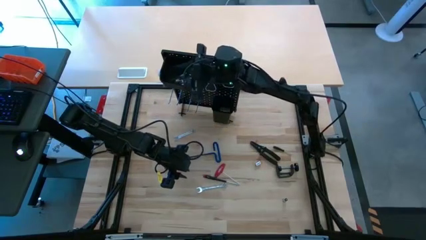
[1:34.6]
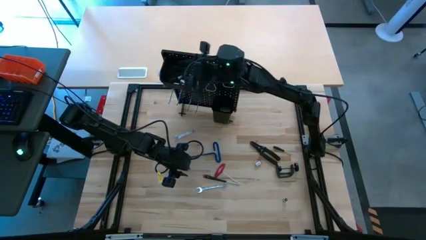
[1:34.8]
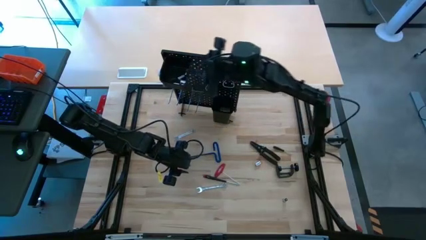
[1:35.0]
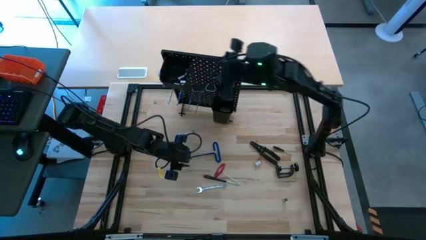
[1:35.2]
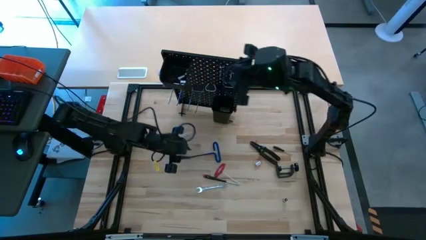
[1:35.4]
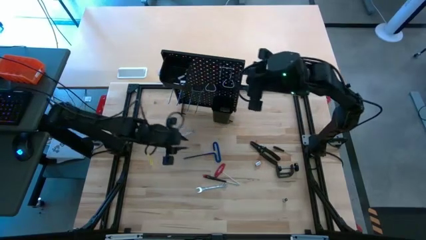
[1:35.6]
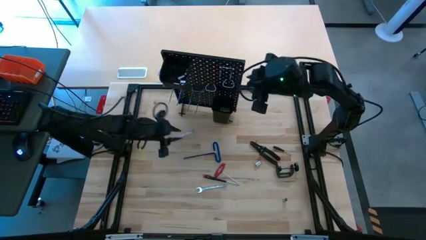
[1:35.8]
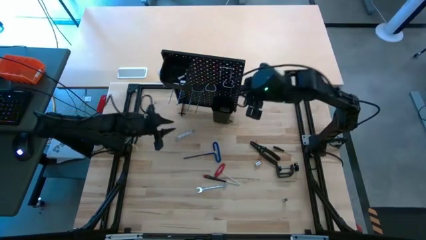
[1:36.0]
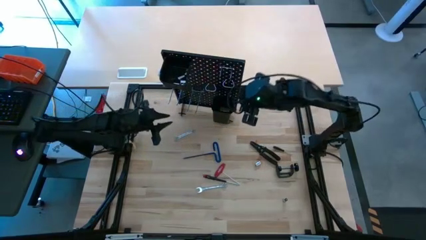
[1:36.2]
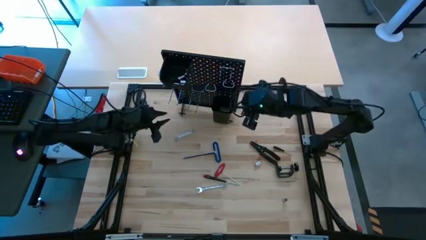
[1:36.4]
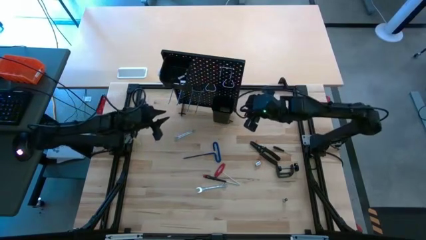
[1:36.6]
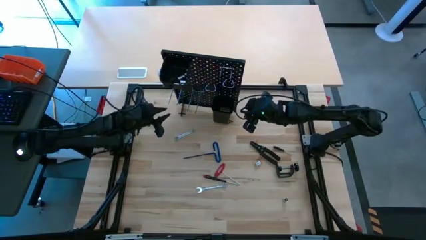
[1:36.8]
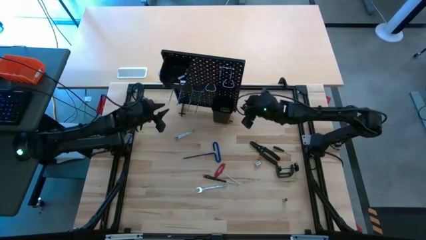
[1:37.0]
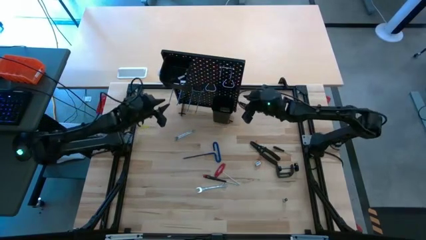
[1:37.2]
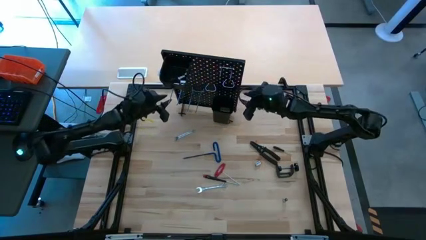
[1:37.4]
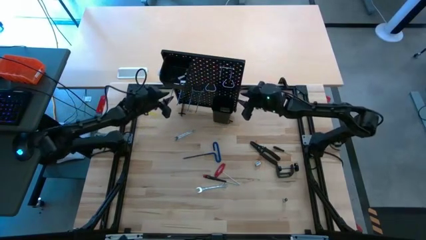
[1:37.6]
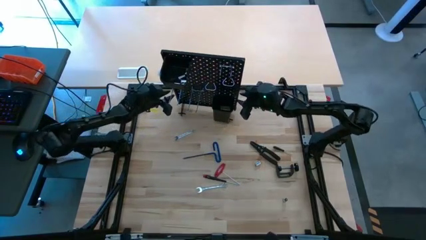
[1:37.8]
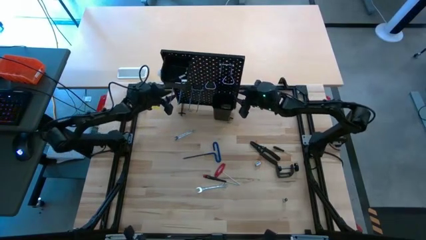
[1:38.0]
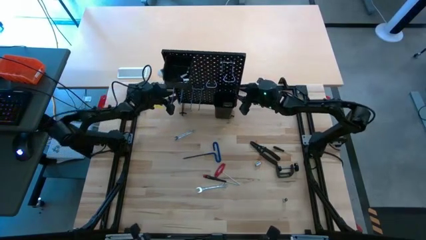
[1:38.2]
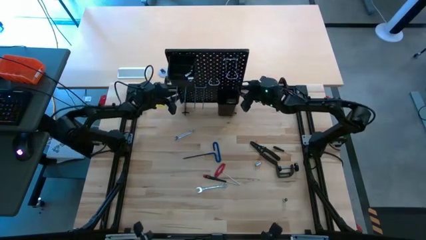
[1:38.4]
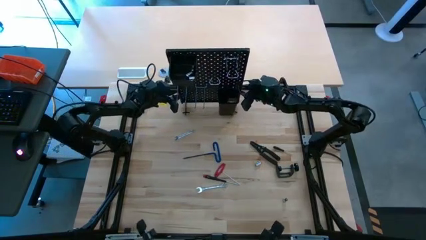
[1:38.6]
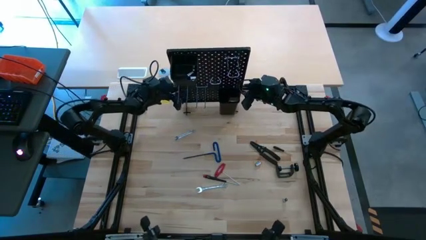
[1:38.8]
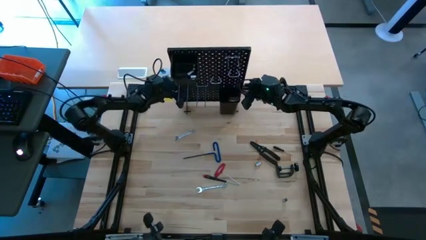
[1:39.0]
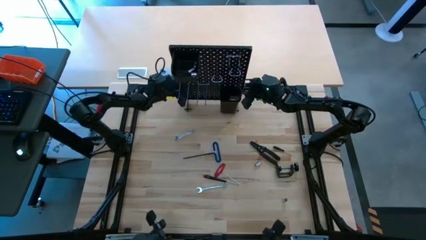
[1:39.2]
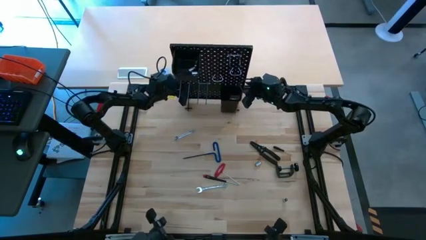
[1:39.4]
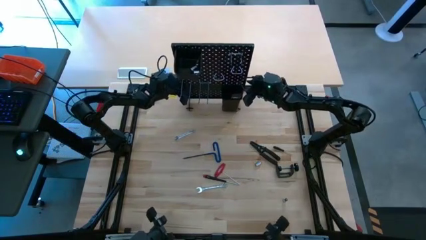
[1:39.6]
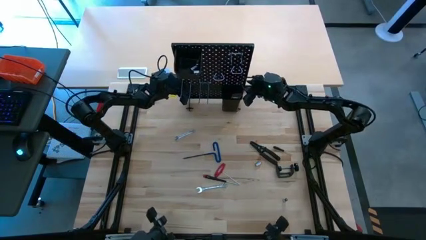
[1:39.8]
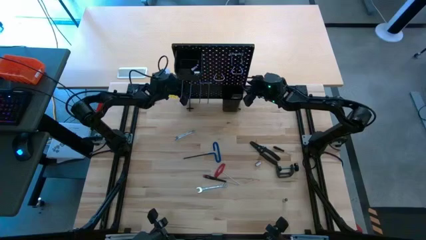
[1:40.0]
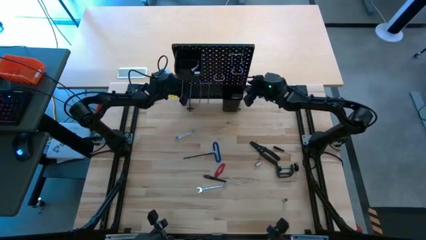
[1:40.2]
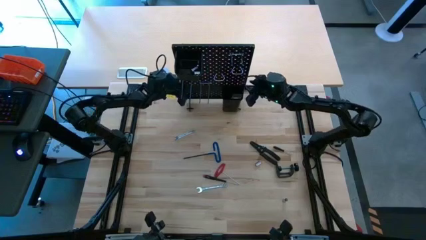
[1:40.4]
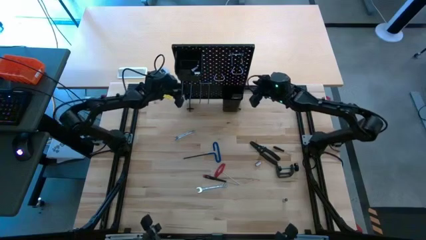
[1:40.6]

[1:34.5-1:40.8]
Task: Hang tools onto peg board
Adjust the pegboard

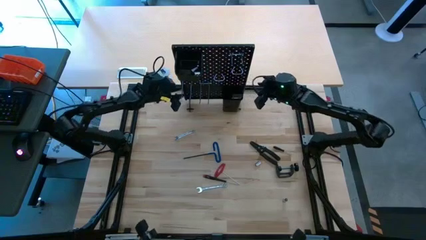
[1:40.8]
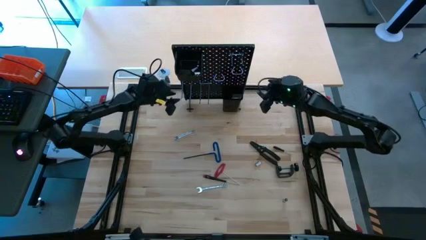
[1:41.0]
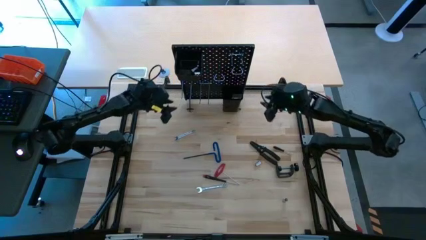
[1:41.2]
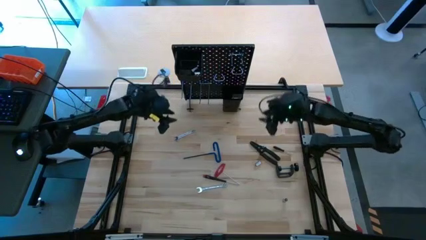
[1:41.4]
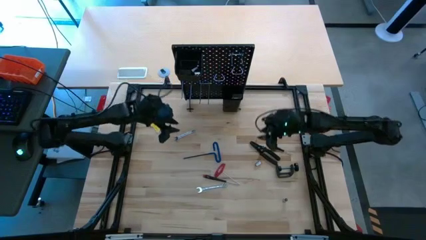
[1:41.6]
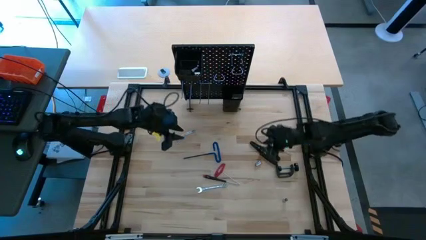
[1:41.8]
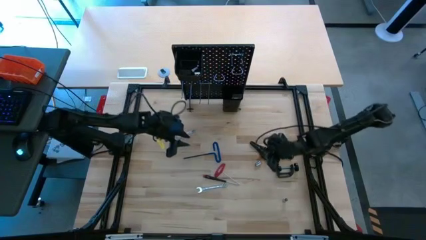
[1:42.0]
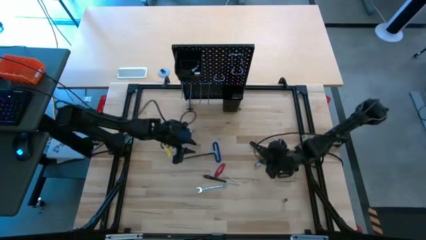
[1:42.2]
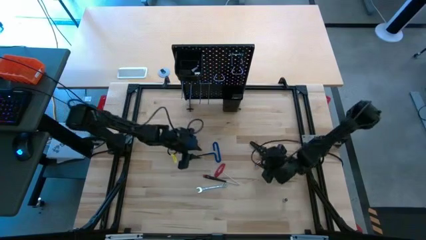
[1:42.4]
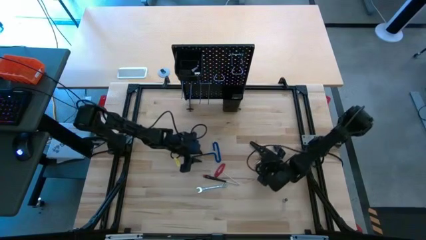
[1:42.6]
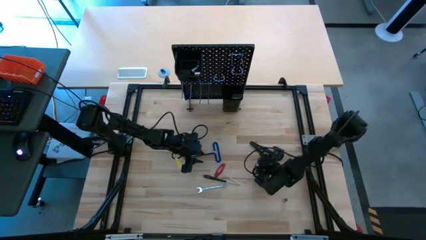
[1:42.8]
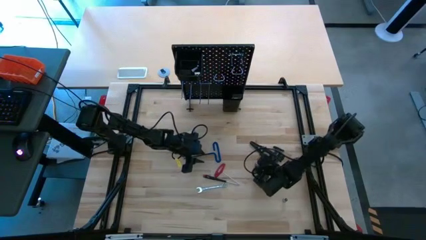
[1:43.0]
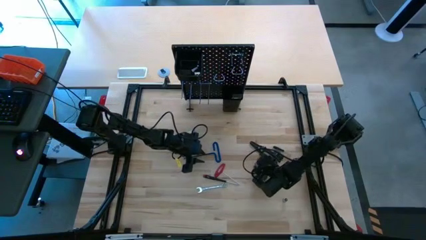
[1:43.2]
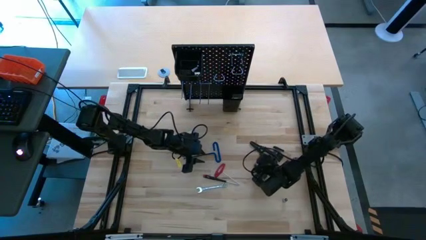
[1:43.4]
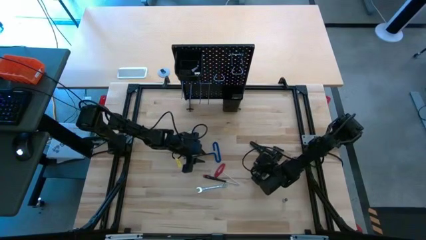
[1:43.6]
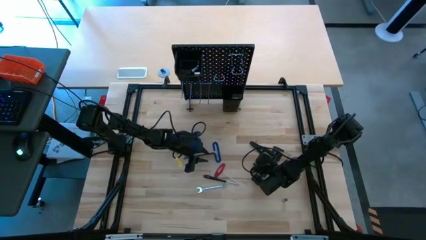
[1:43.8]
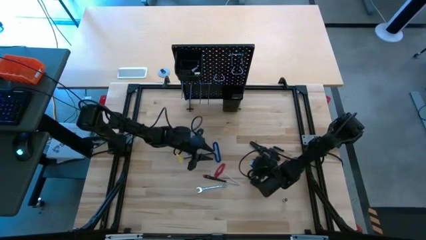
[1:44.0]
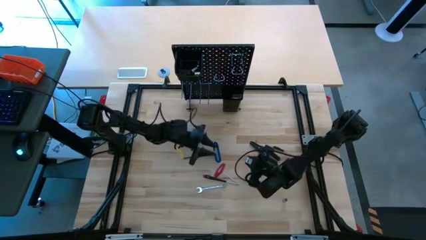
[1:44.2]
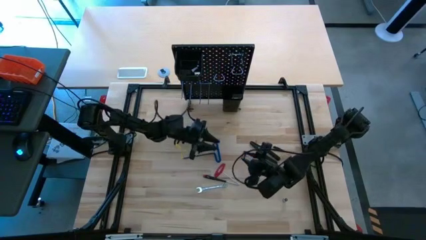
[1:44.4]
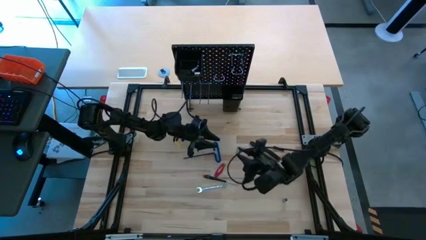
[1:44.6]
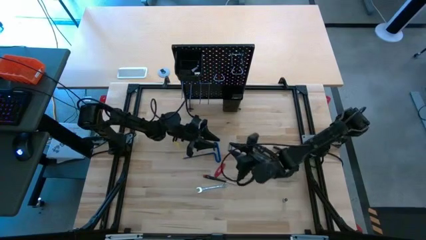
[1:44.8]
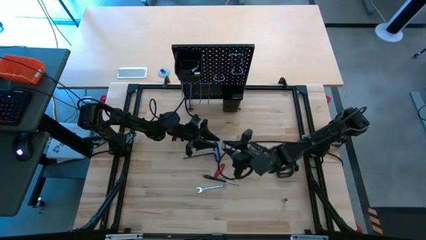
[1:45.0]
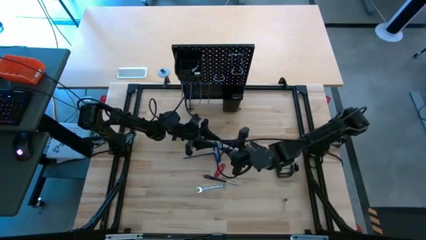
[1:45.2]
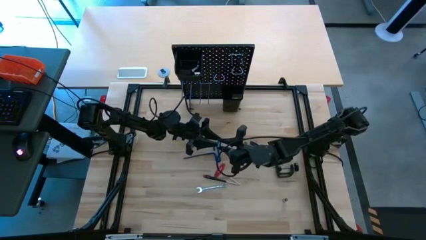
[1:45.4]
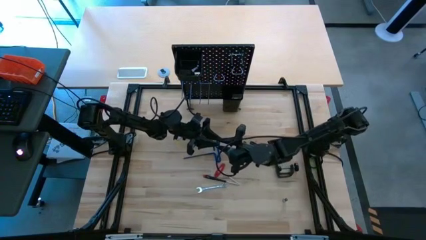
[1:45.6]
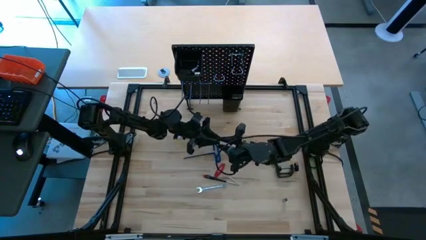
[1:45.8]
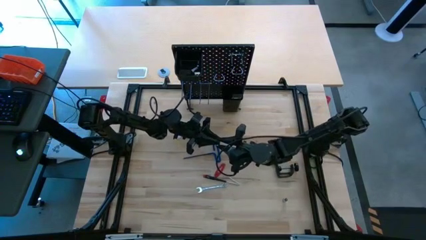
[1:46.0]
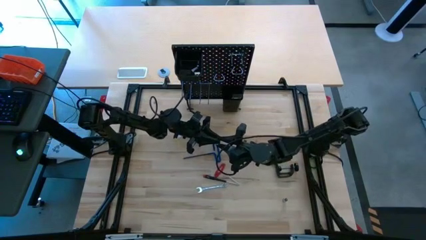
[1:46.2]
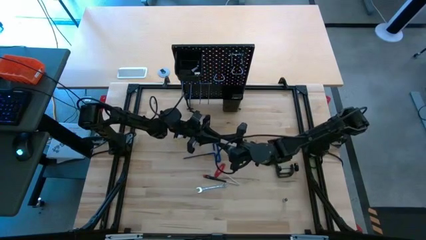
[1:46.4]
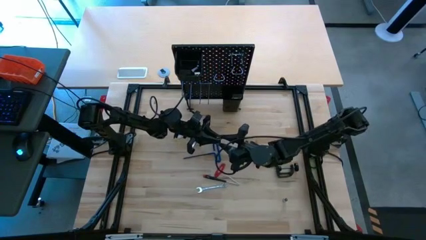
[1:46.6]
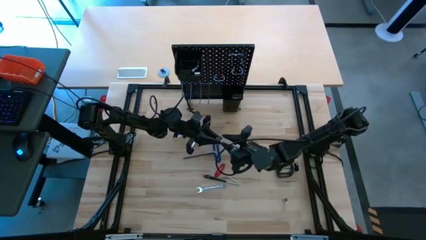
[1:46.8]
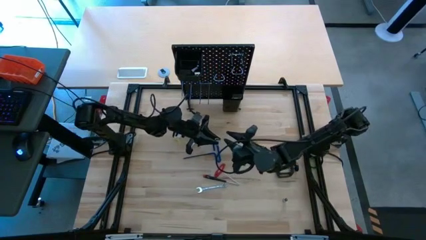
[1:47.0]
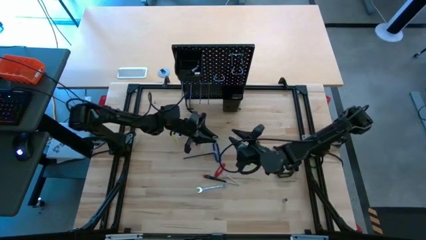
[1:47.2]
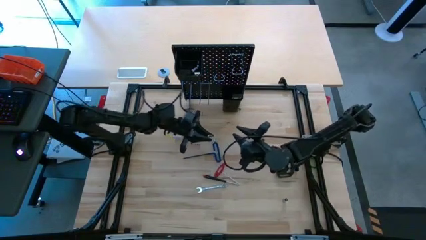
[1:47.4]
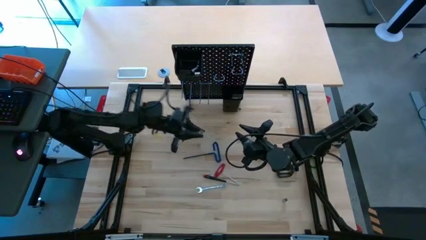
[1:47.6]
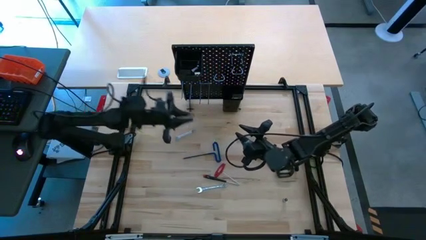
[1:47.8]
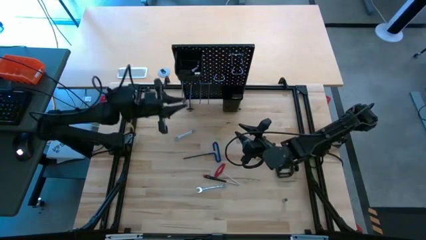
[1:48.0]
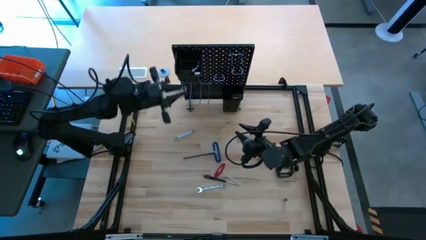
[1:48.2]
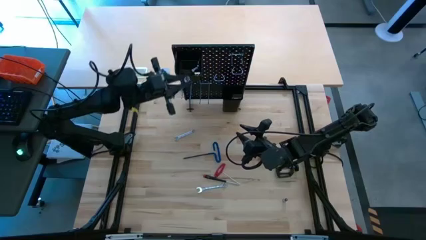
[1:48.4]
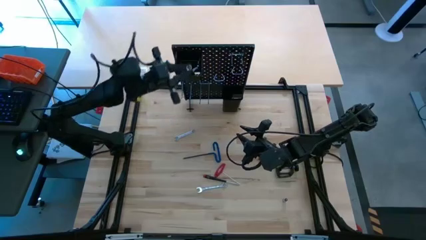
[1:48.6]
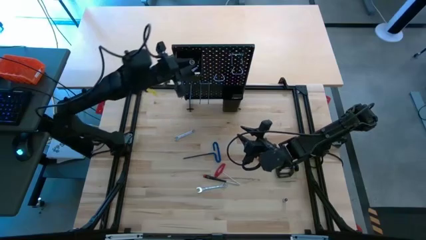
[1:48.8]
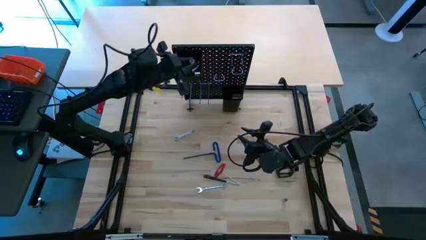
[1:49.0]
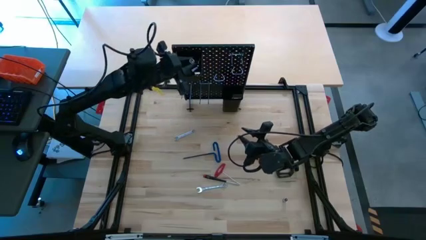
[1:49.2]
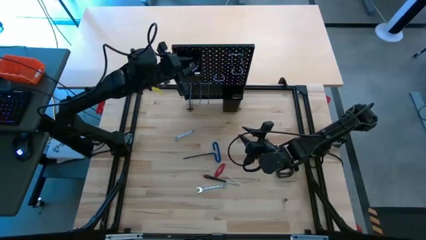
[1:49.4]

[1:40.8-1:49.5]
Put the socket into the top black bin on the pegboard
